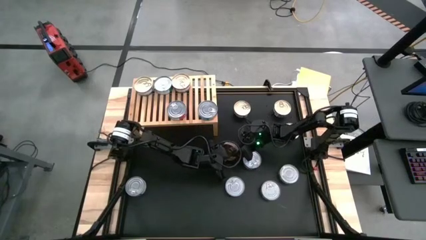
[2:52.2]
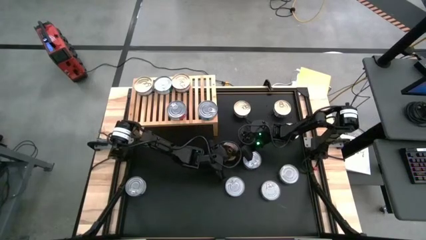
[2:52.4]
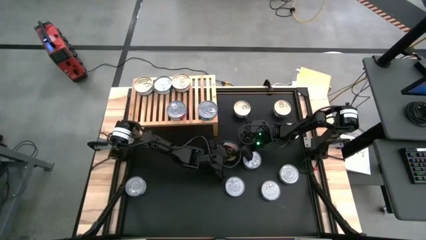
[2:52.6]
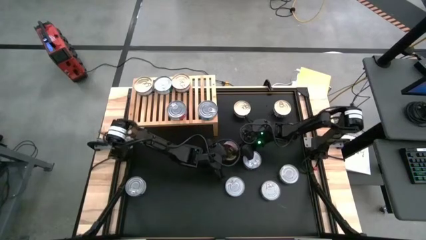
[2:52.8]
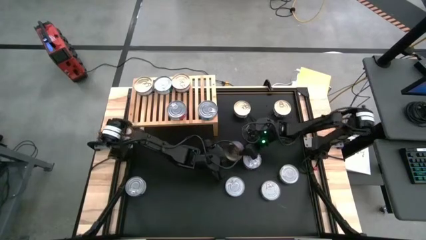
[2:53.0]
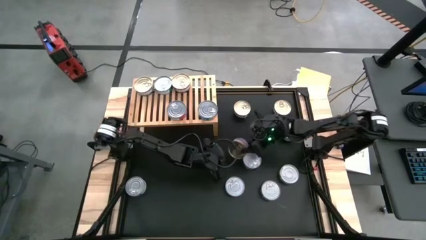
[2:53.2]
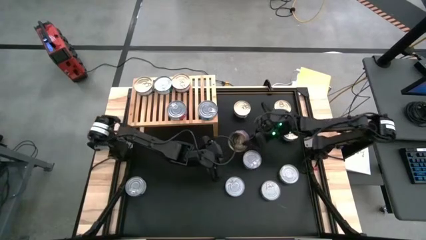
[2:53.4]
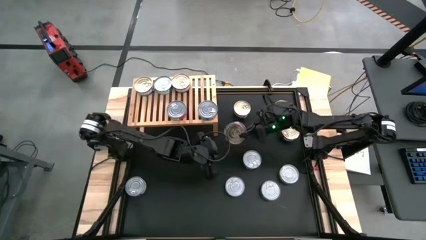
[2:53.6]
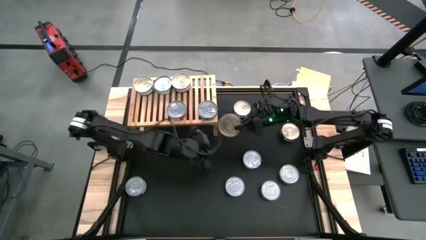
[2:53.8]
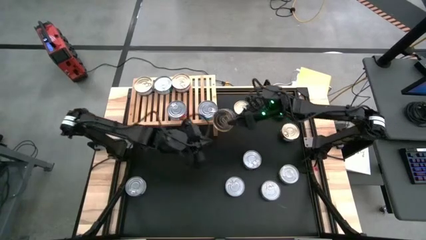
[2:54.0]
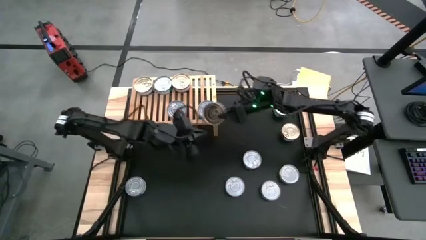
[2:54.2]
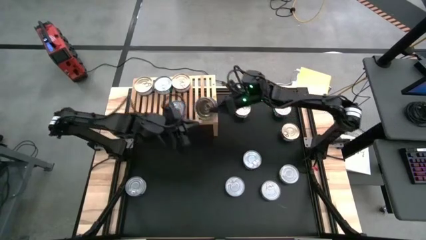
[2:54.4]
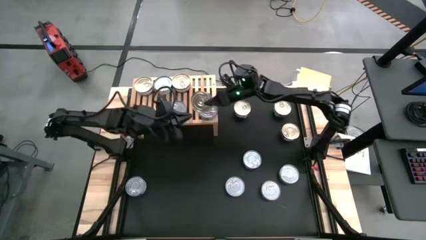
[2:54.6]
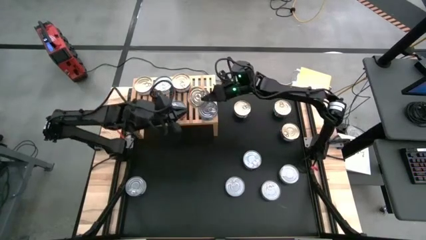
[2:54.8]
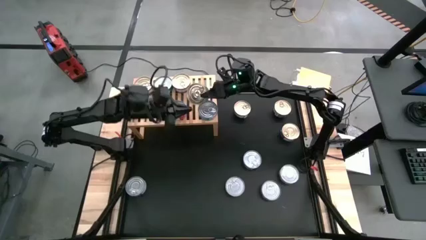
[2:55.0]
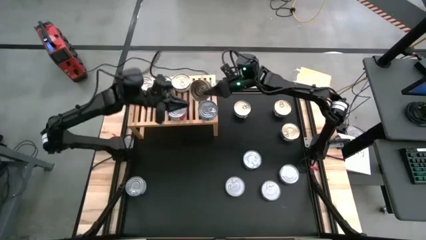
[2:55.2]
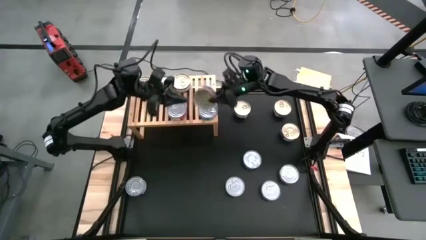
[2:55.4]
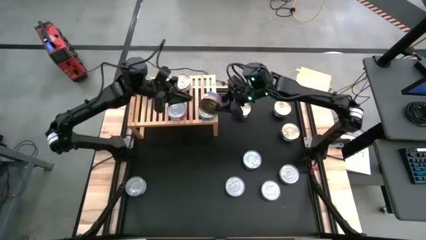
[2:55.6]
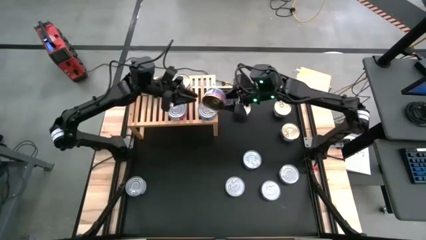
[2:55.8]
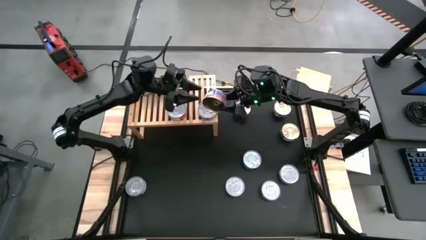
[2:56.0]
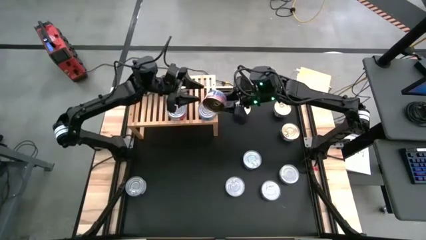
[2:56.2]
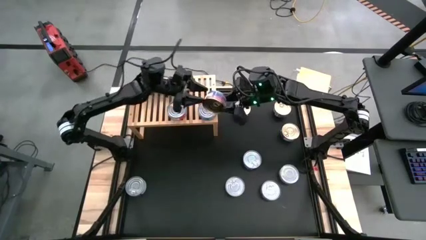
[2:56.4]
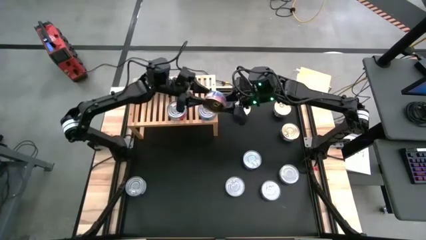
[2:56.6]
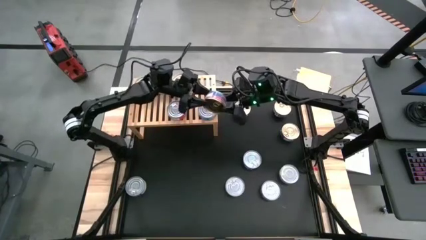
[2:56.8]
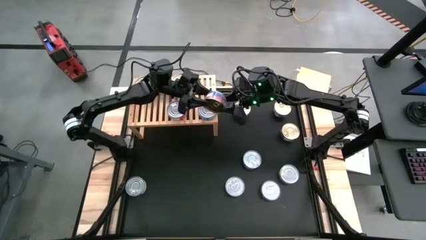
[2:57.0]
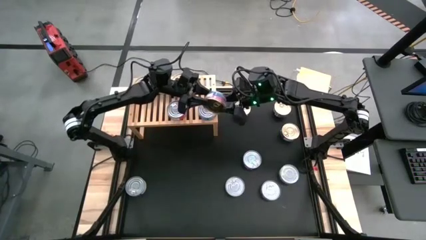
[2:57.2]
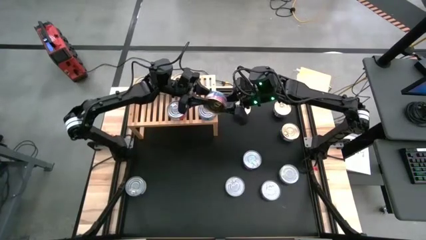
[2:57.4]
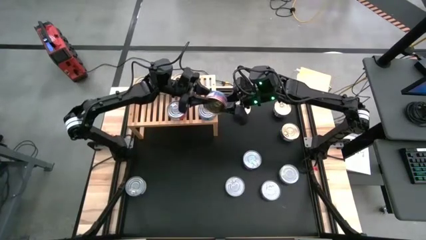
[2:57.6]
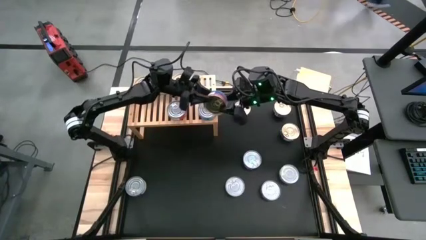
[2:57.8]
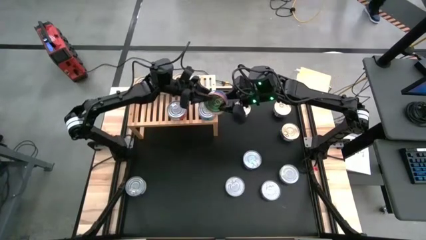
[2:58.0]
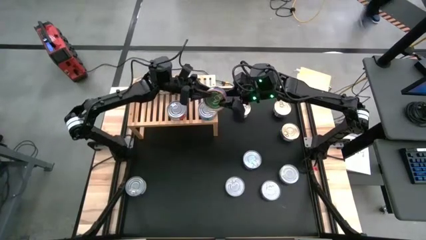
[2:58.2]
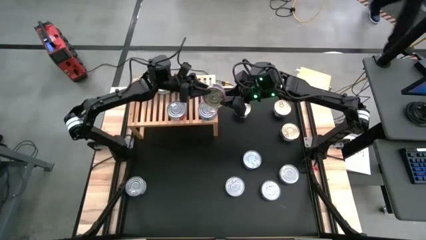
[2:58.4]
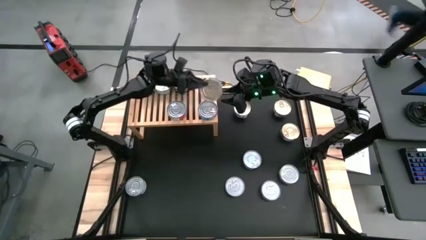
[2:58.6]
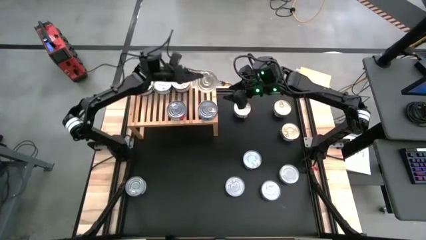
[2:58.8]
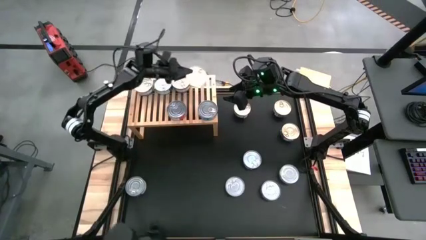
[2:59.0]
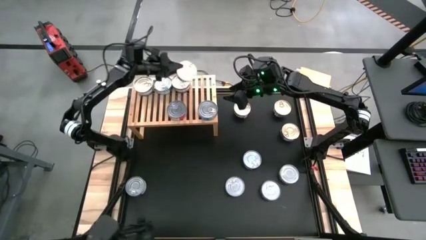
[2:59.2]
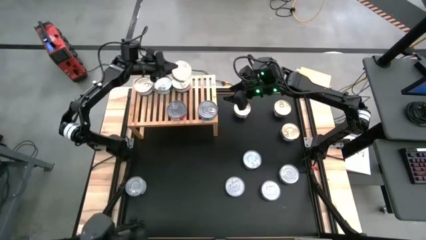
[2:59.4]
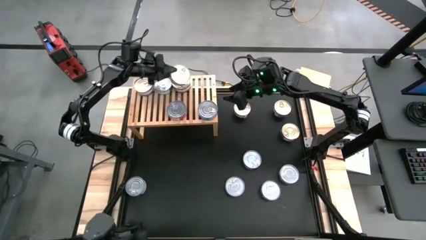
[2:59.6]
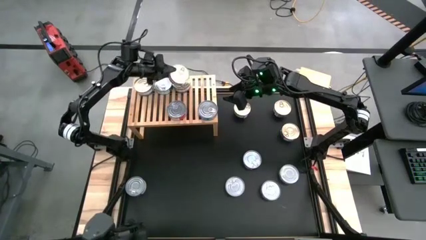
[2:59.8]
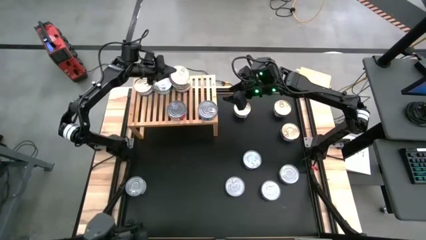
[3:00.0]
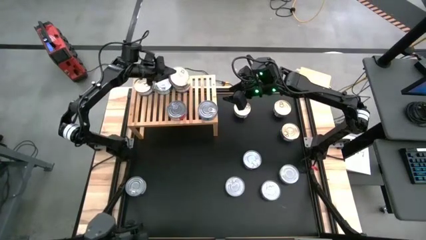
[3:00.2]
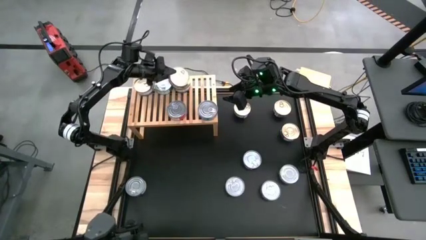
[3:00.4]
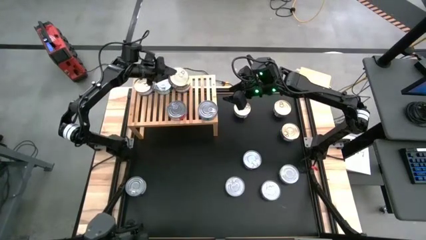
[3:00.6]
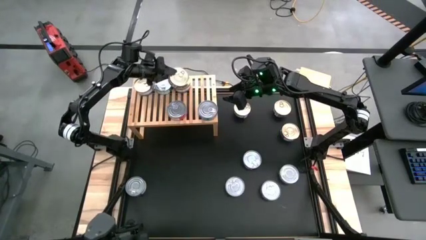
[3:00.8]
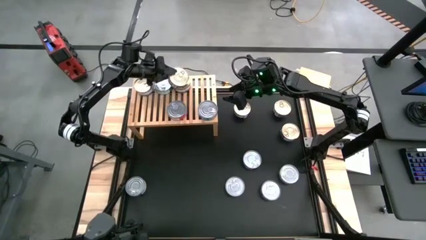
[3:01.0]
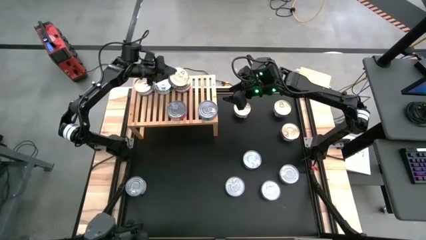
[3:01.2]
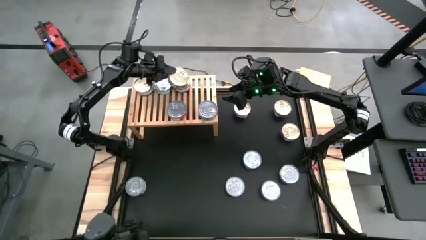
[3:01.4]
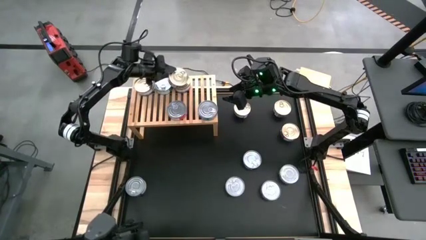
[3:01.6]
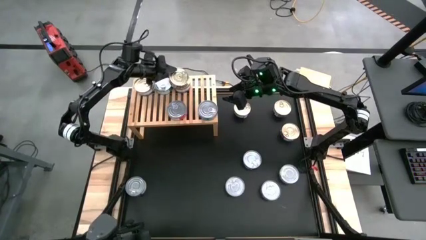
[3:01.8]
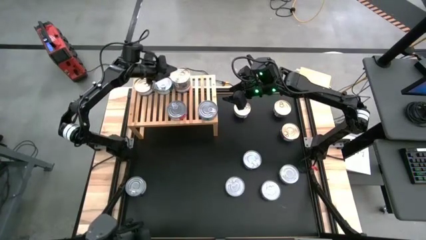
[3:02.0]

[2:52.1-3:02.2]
Task: Stack canned seafood by type on shelf
Stack the blue pink tuna can on top of the other blue pink tuna can on the shelf

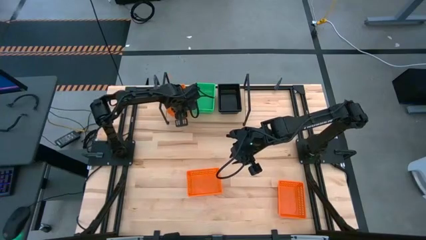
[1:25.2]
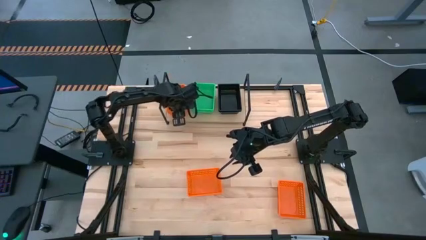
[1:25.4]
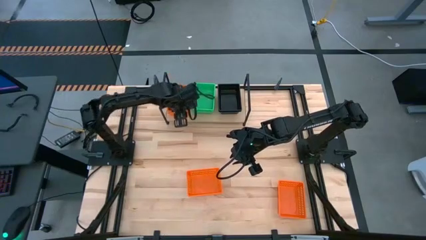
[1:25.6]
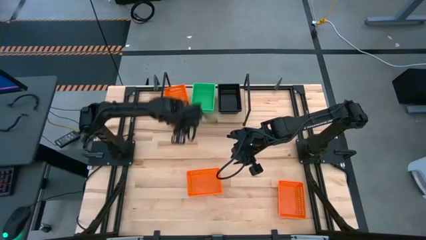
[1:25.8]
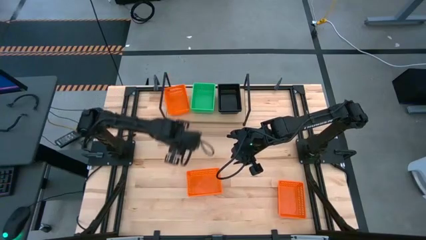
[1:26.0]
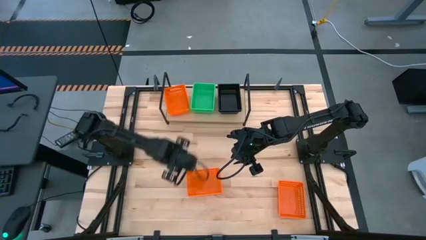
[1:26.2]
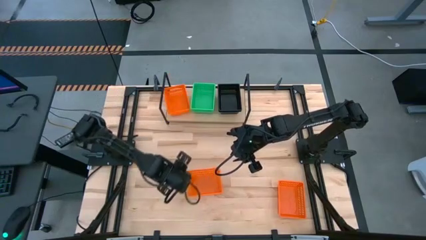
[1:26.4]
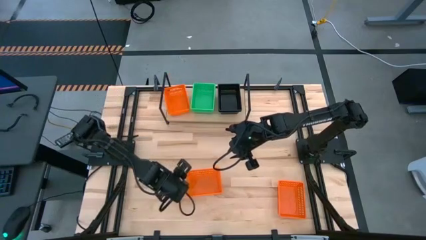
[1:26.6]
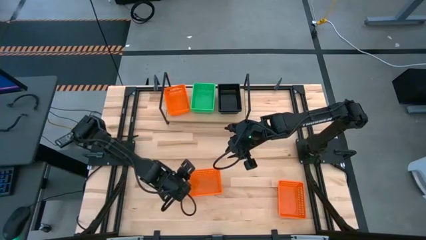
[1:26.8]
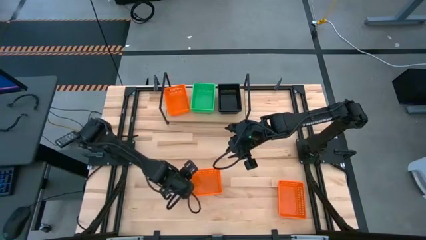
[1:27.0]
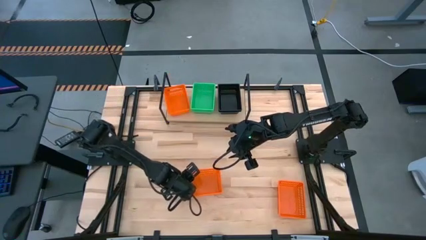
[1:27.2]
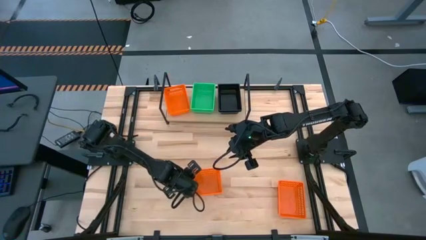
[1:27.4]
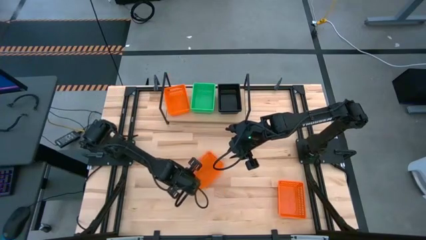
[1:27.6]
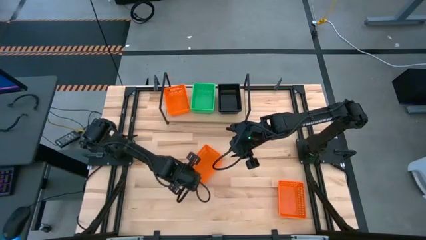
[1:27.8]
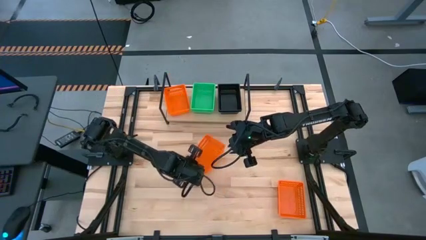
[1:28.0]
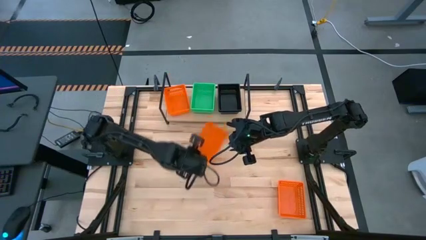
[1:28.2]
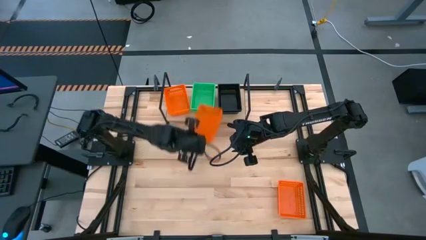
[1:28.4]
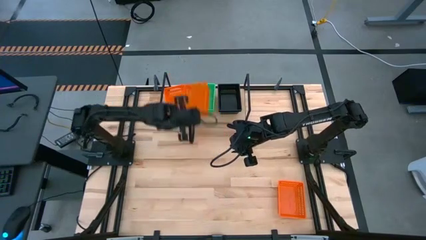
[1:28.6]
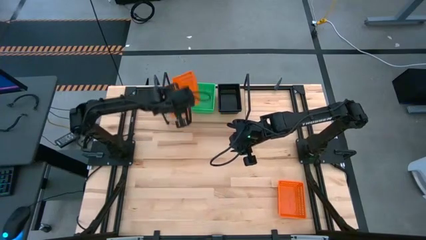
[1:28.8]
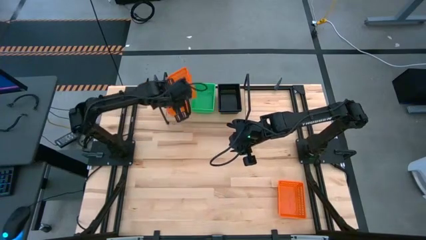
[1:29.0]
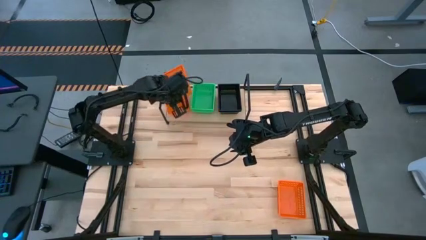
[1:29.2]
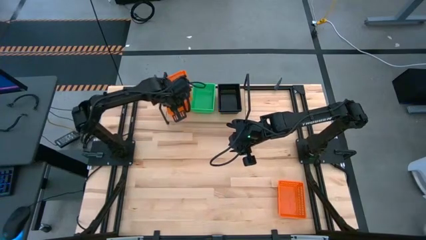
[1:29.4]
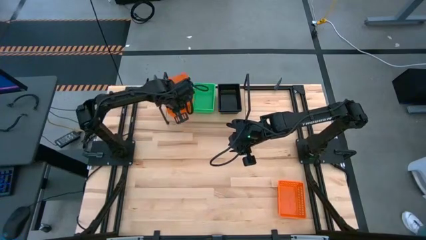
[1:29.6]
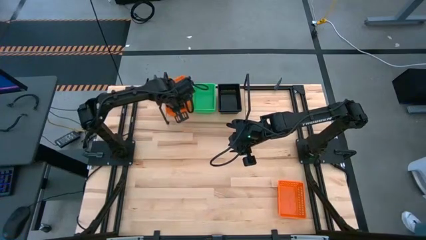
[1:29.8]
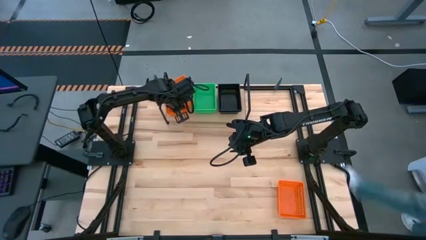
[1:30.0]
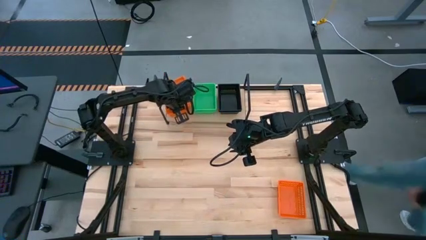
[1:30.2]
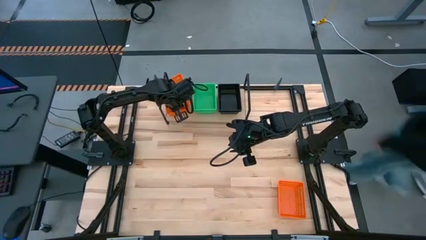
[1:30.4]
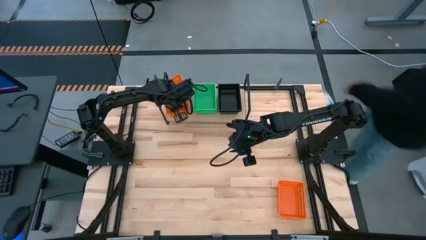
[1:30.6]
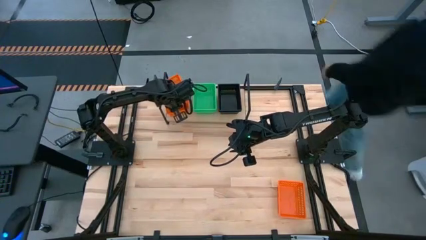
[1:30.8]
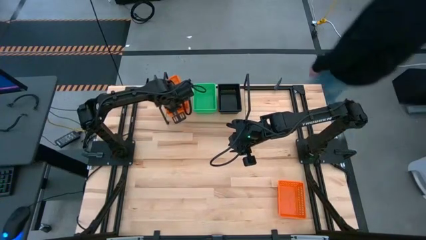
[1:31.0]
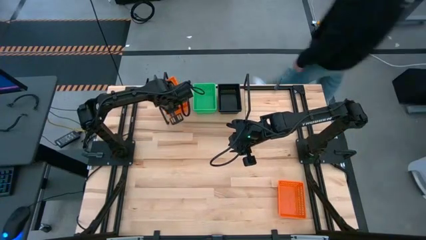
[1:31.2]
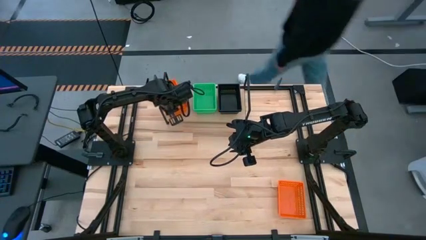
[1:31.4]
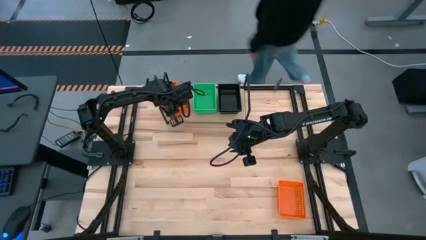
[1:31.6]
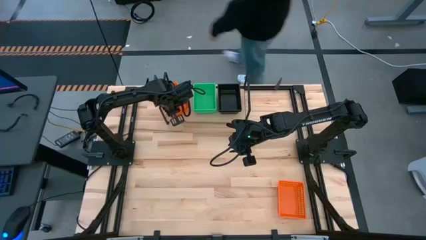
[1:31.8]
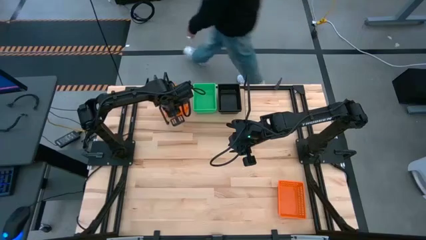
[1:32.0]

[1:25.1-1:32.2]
Task: Stack baskets on shelf by color
Stack the top orange bin on top of the stacked orange bin on the shelf
